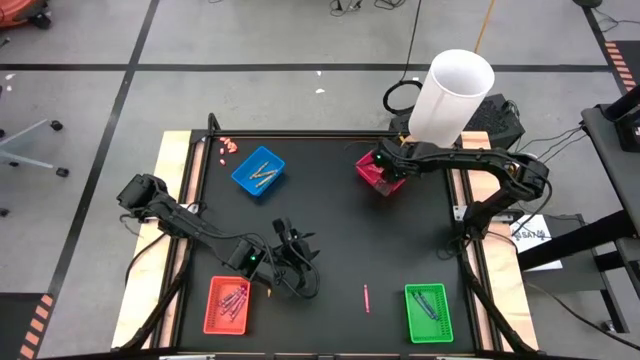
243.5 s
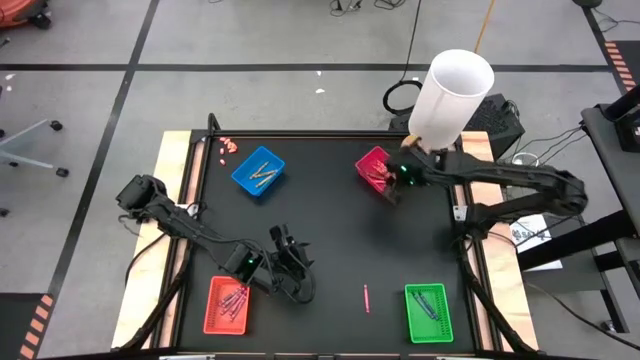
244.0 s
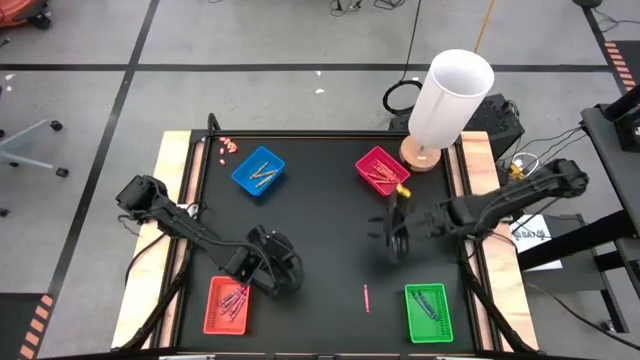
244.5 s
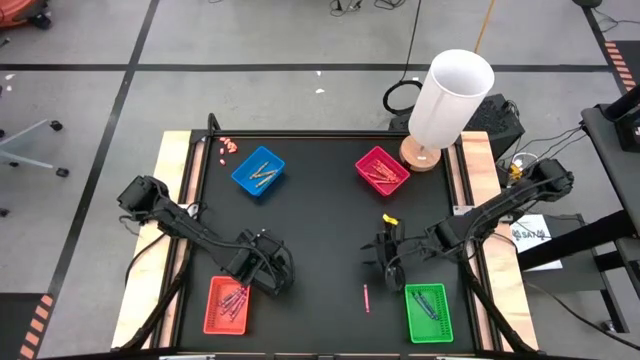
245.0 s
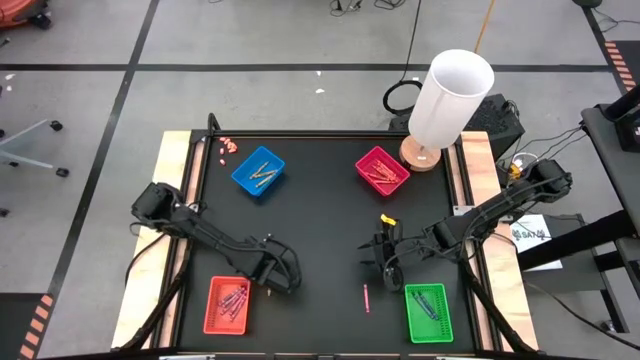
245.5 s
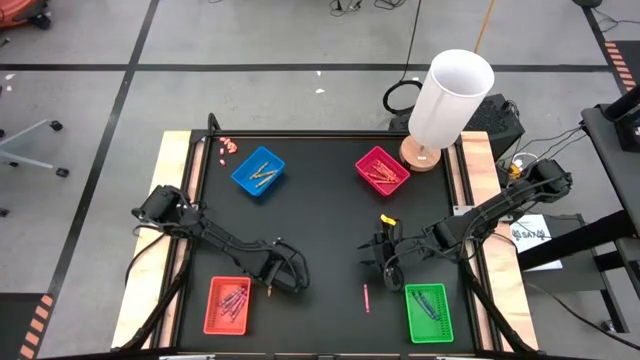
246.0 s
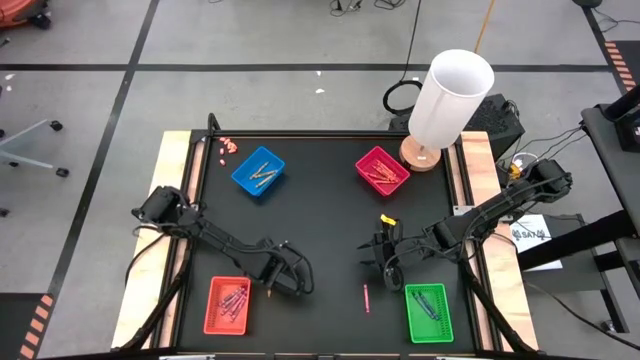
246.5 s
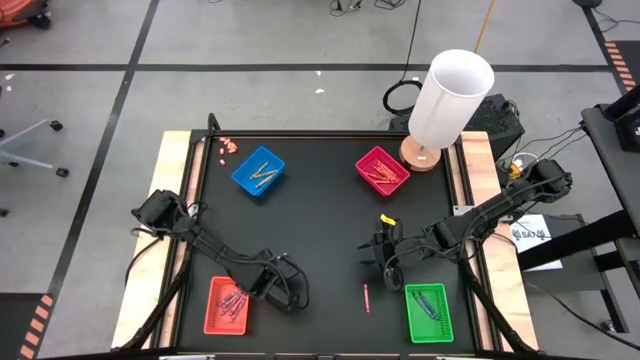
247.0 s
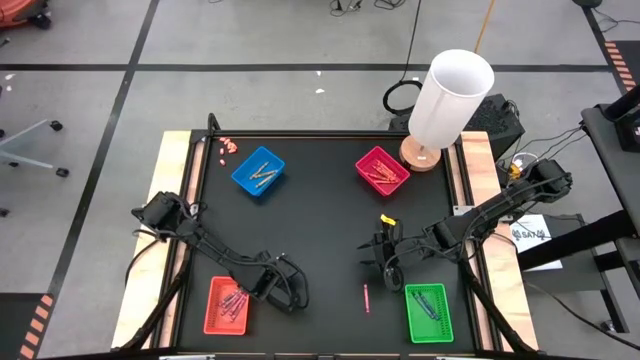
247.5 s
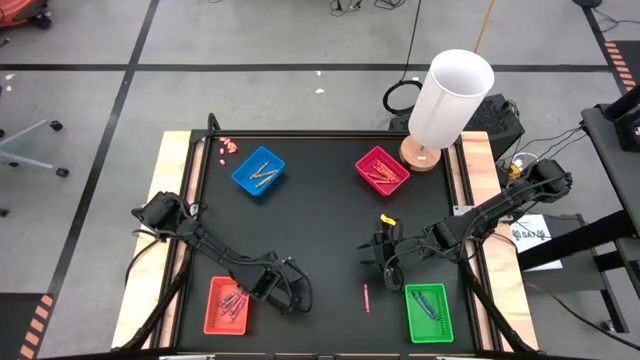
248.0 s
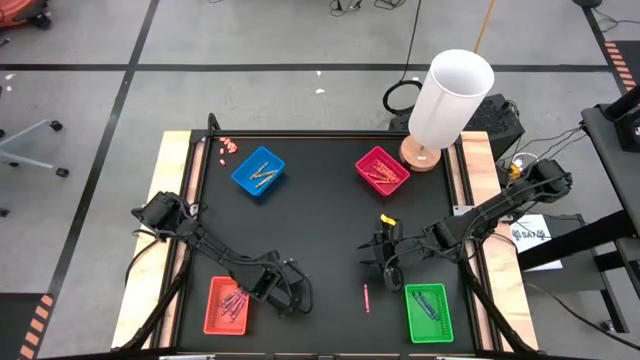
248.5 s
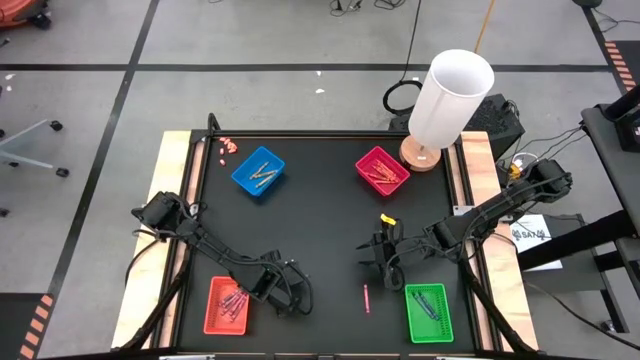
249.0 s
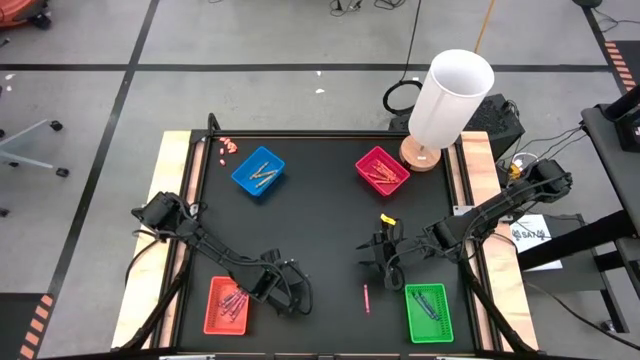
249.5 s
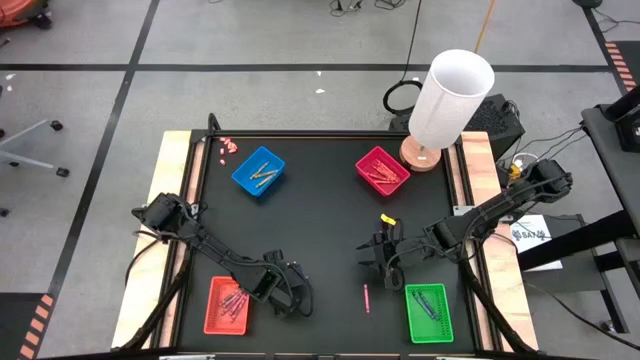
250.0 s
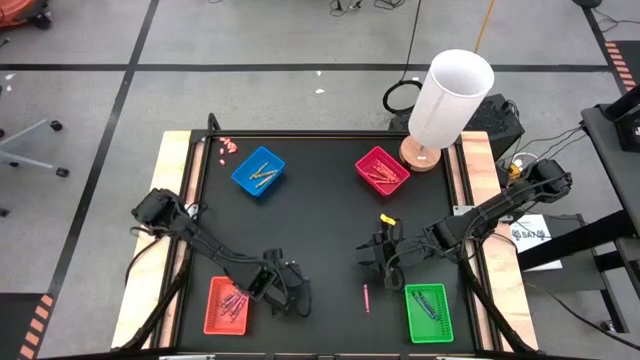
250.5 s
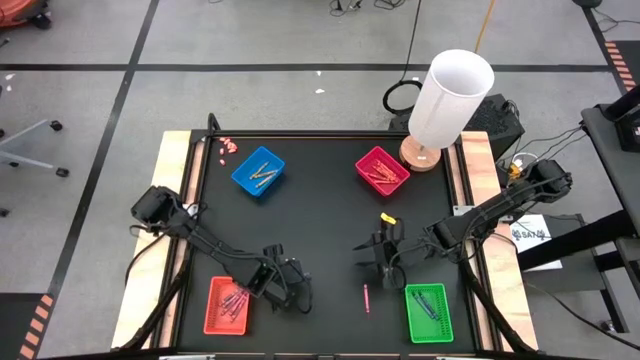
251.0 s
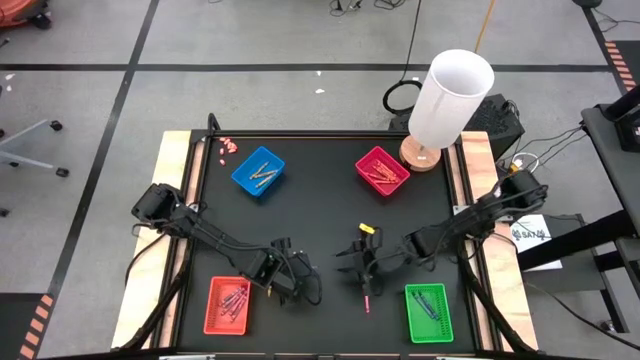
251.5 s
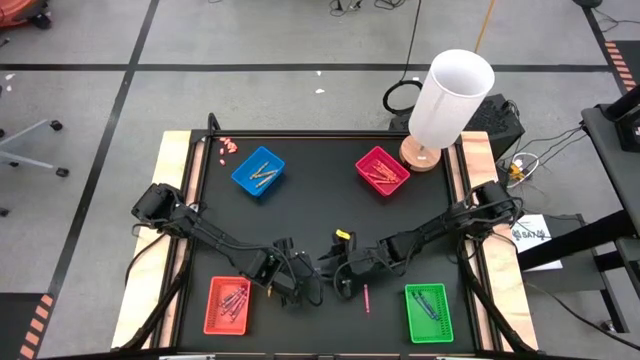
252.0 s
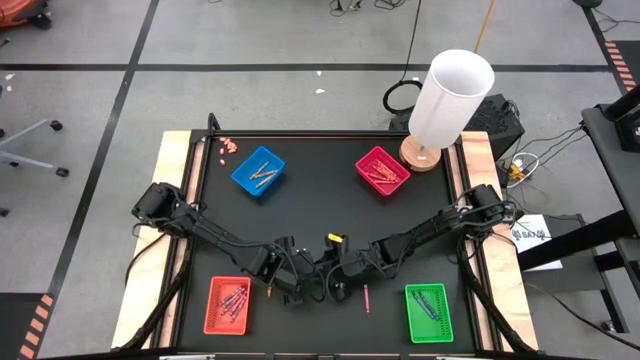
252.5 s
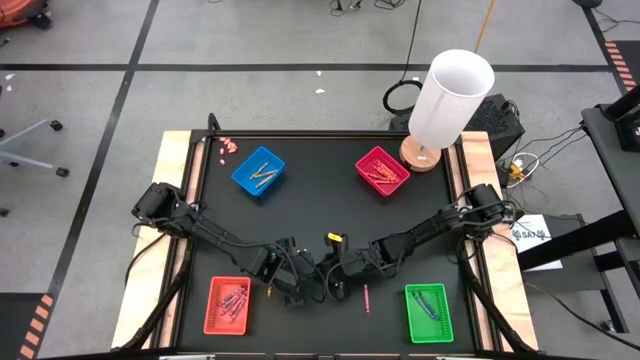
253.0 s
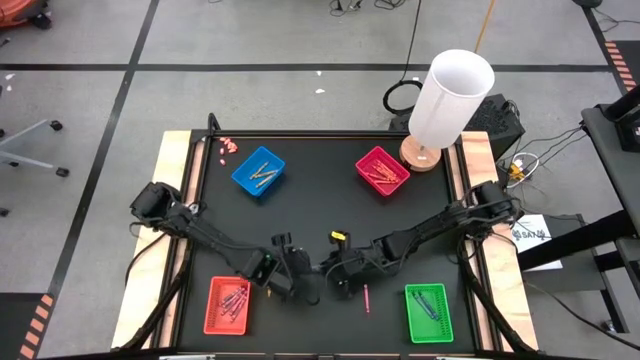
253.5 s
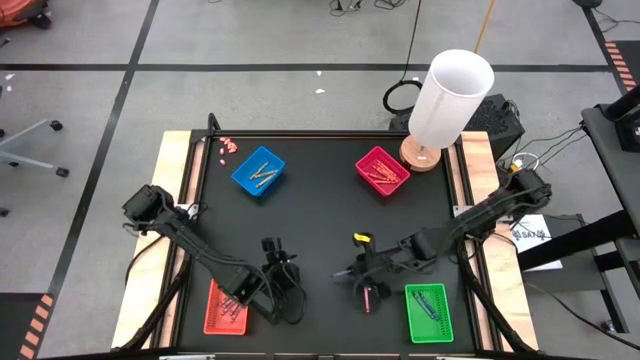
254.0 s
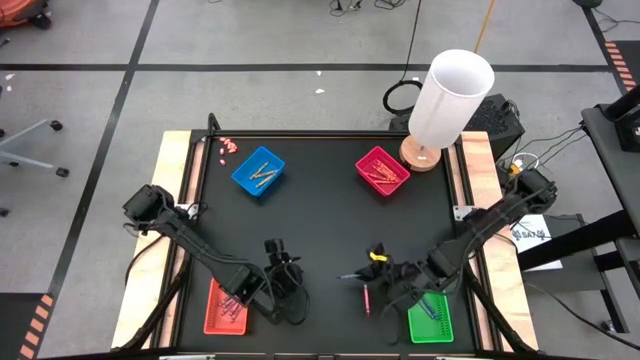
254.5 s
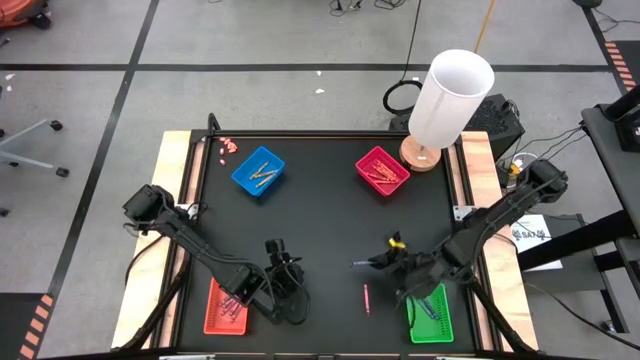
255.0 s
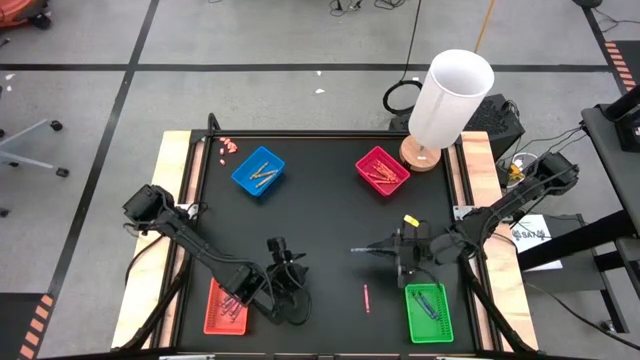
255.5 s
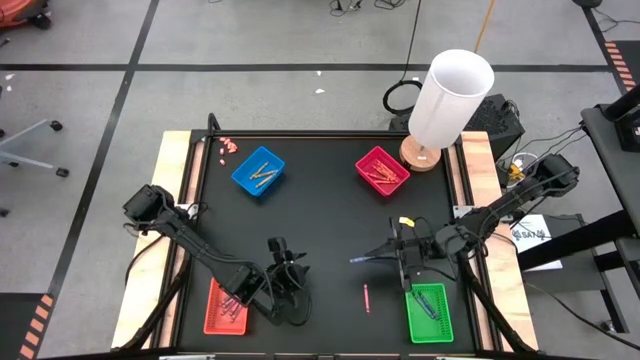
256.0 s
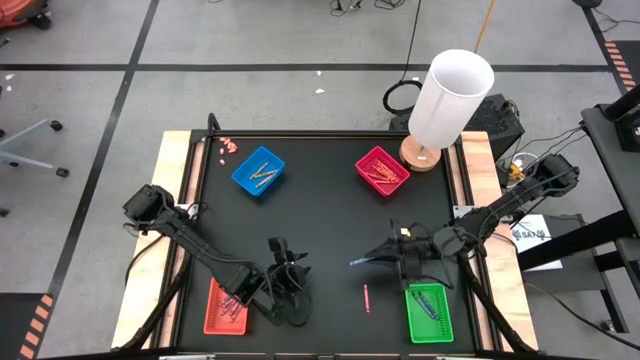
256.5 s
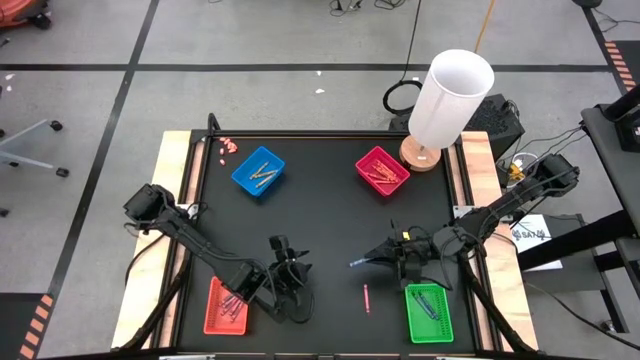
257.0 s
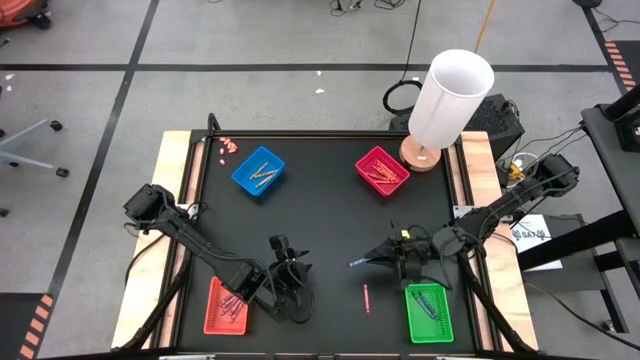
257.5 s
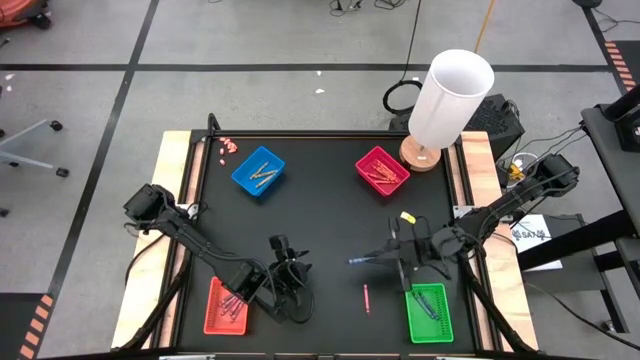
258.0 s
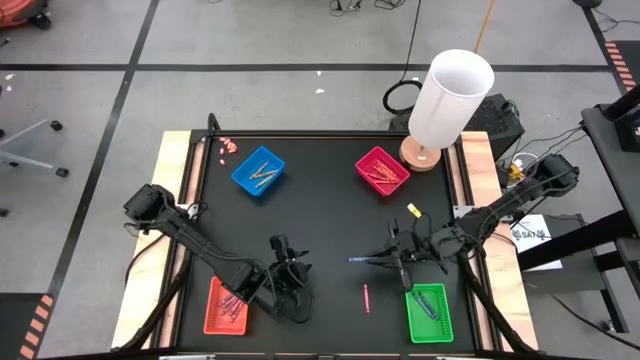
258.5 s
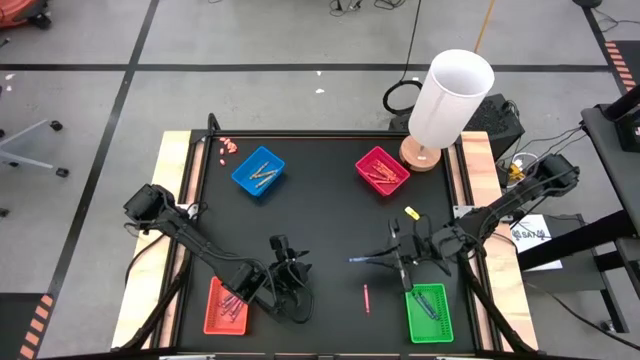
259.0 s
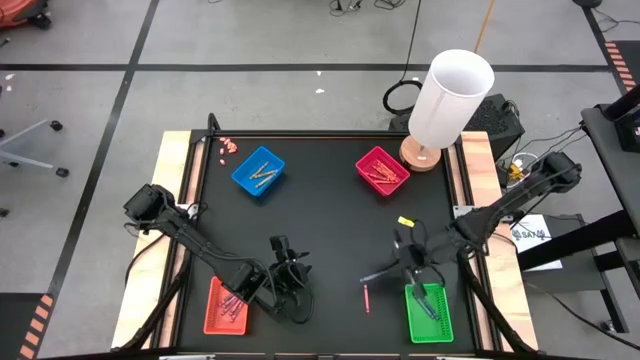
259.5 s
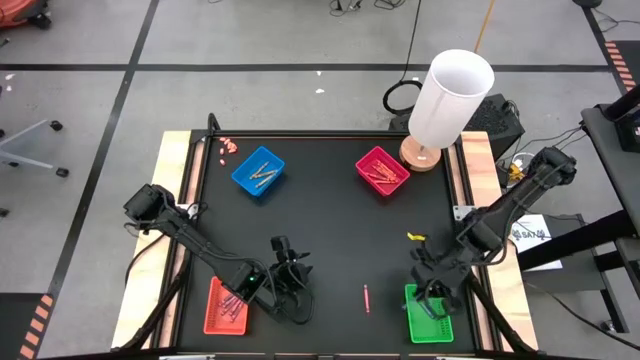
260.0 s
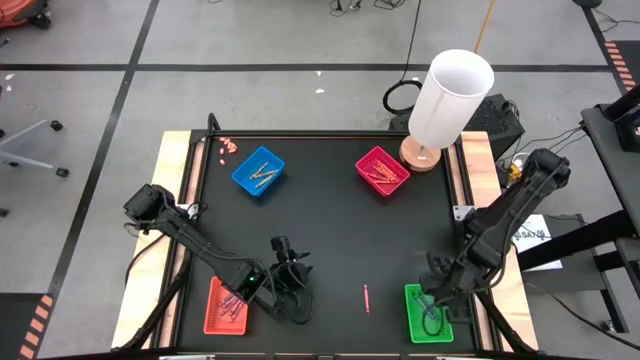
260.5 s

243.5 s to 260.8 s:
Task: Sort crayons
Put the blue crayon into the green bin

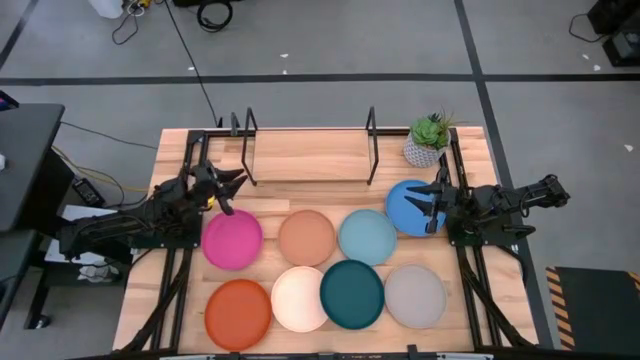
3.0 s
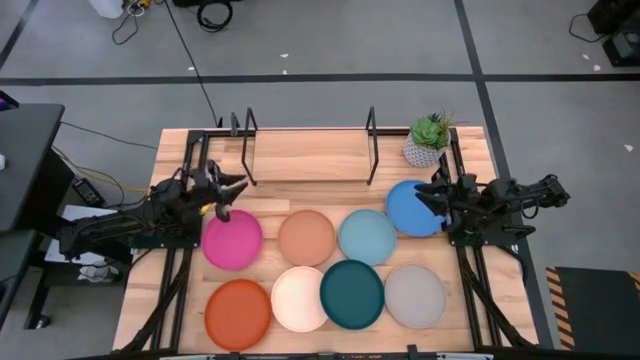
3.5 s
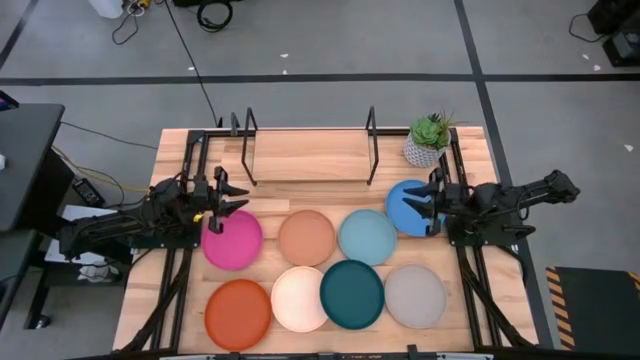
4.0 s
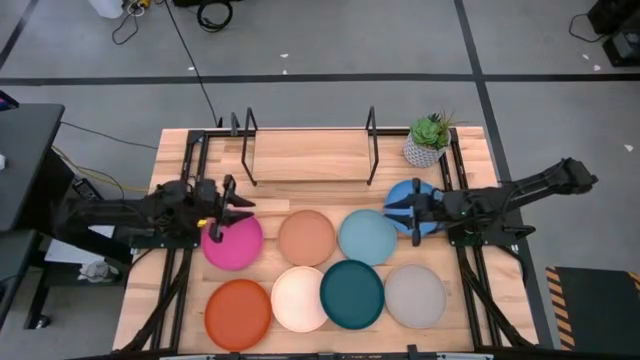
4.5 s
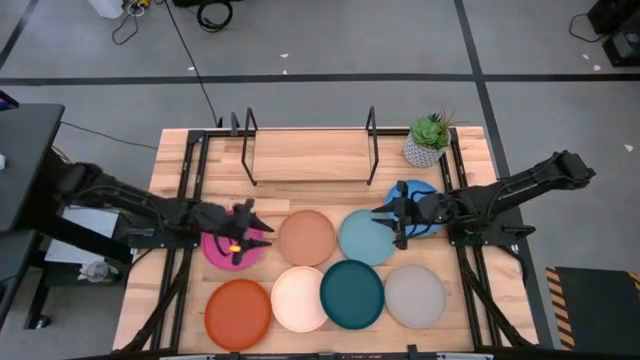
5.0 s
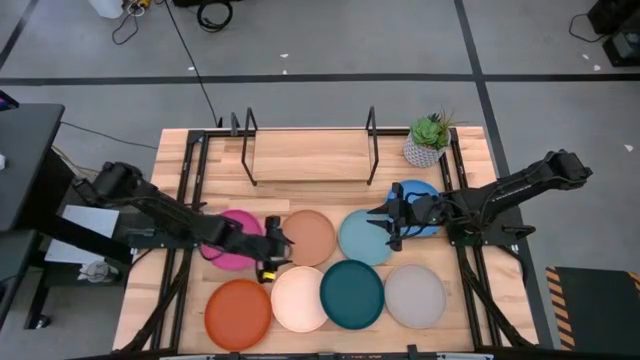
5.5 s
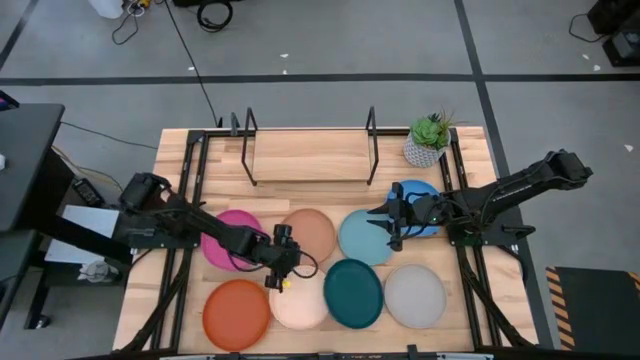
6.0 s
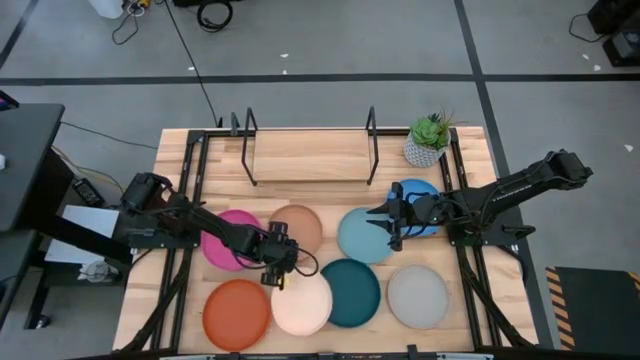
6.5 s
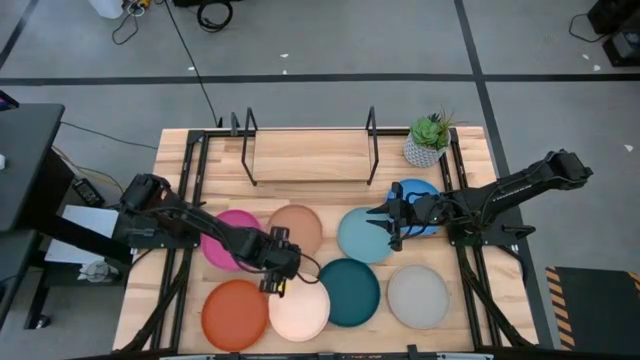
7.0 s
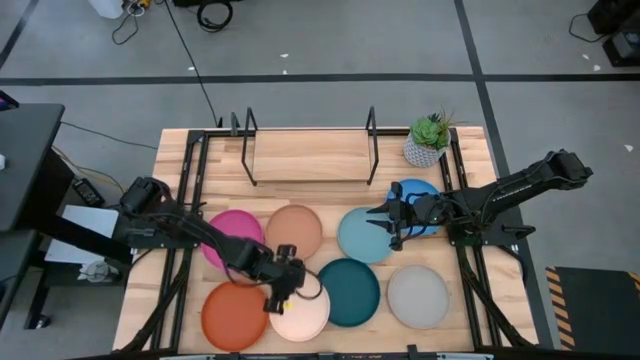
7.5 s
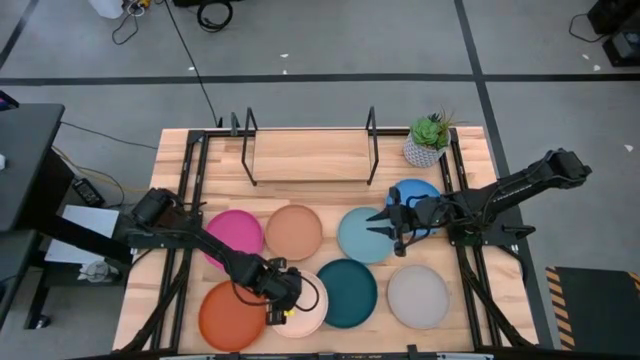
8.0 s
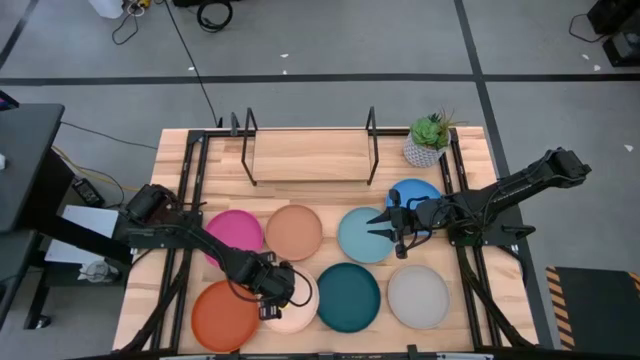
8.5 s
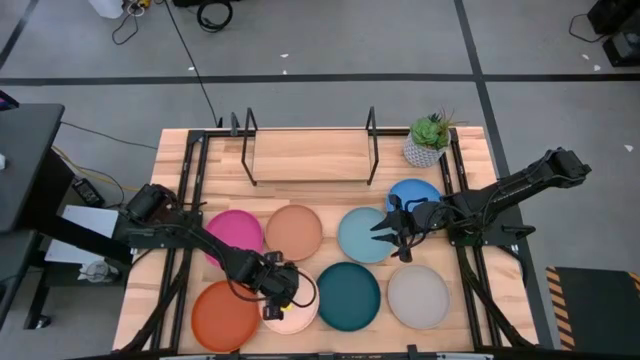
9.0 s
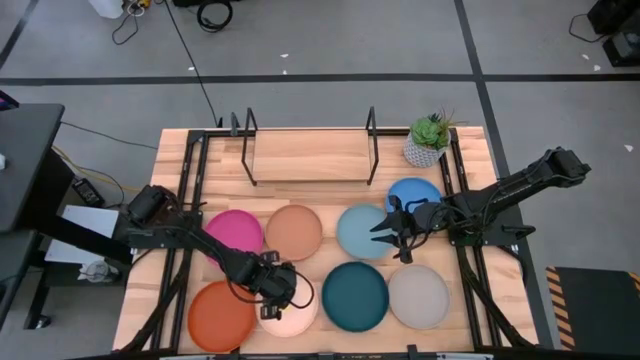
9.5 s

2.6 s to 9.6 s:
Task: Place and stack plates onto a shelf
Adjust the plates
